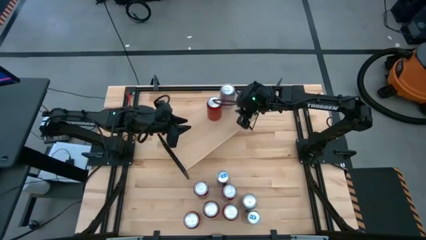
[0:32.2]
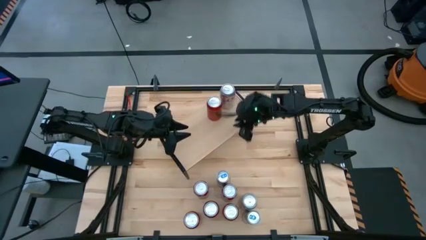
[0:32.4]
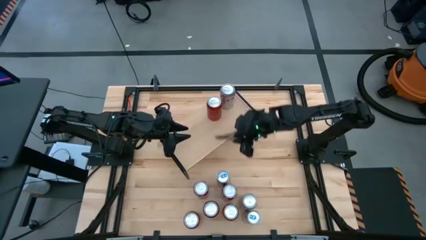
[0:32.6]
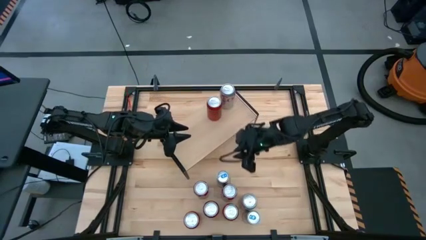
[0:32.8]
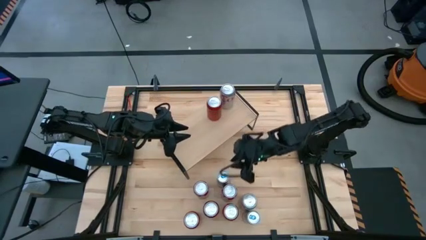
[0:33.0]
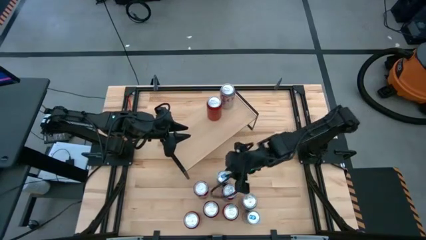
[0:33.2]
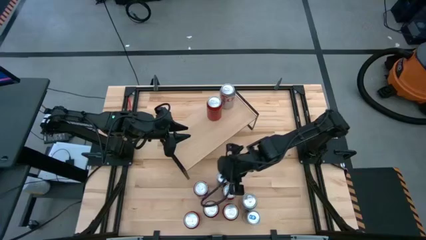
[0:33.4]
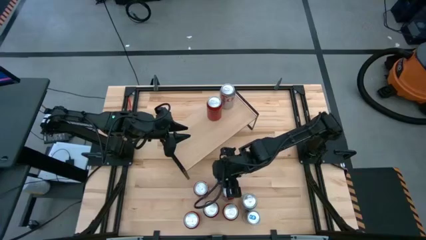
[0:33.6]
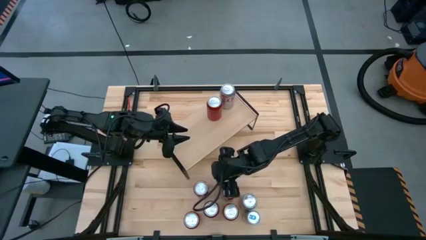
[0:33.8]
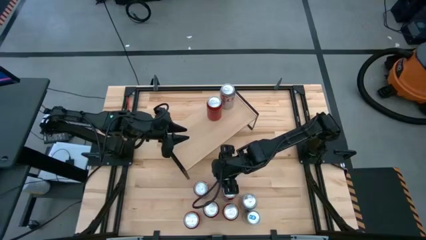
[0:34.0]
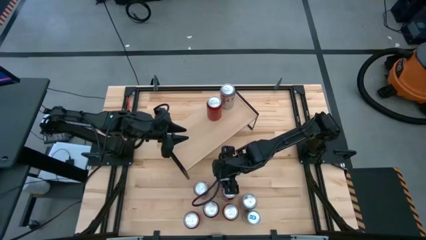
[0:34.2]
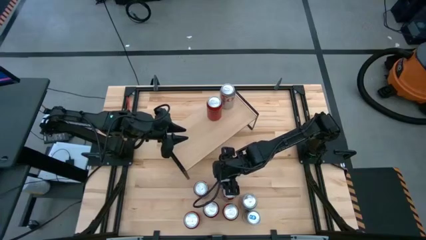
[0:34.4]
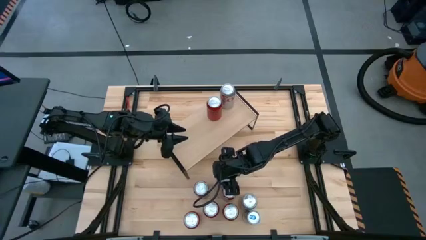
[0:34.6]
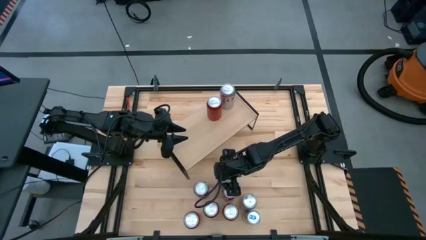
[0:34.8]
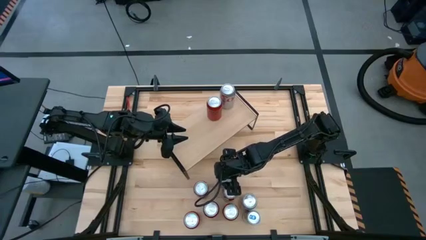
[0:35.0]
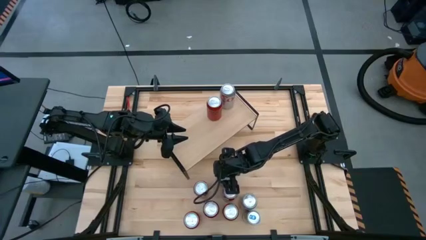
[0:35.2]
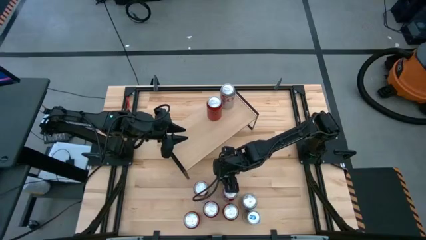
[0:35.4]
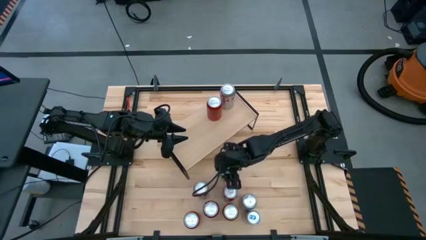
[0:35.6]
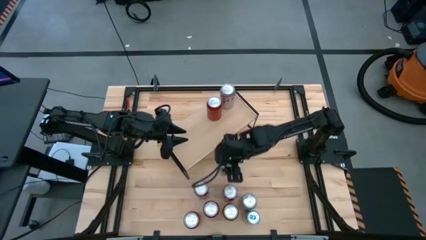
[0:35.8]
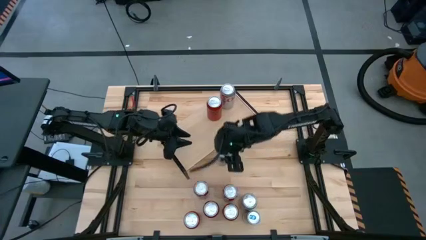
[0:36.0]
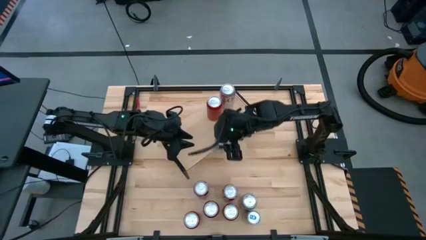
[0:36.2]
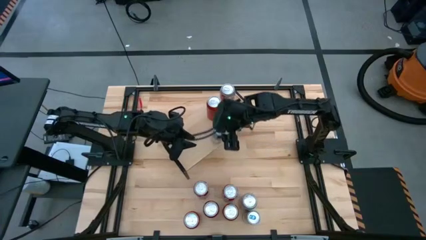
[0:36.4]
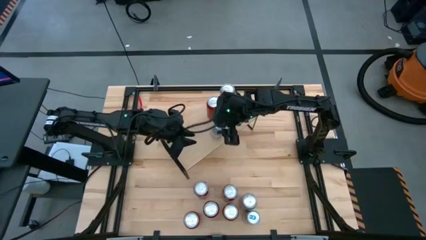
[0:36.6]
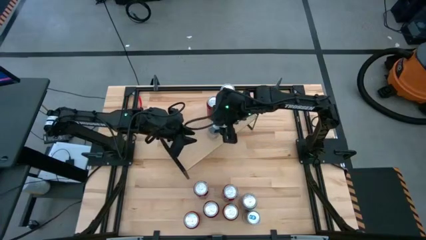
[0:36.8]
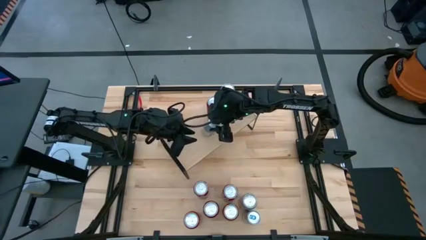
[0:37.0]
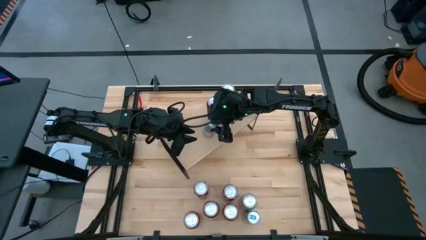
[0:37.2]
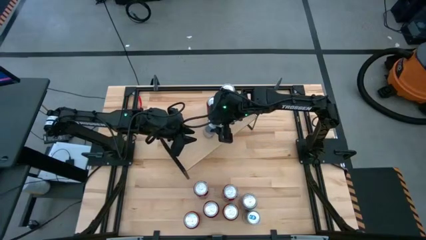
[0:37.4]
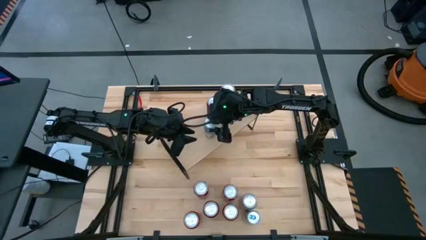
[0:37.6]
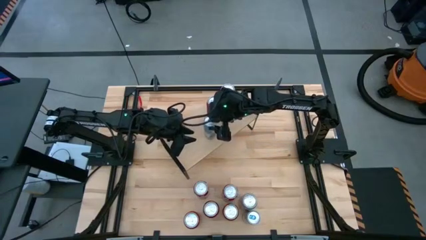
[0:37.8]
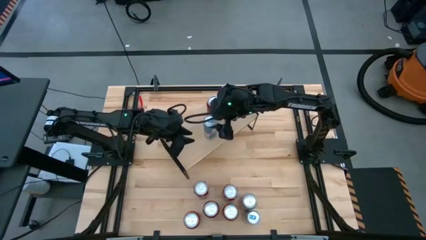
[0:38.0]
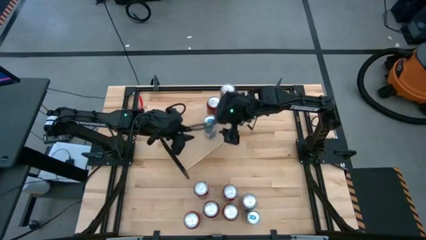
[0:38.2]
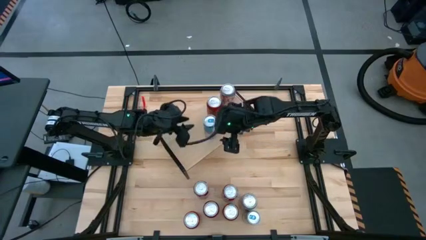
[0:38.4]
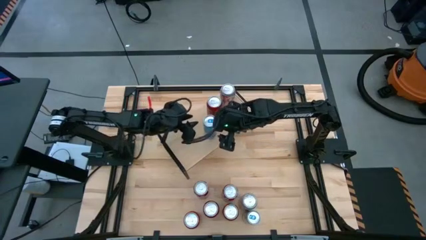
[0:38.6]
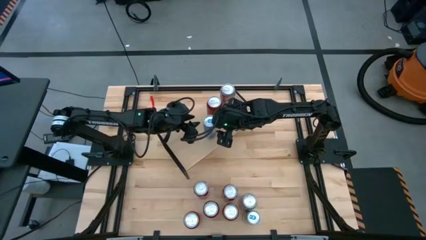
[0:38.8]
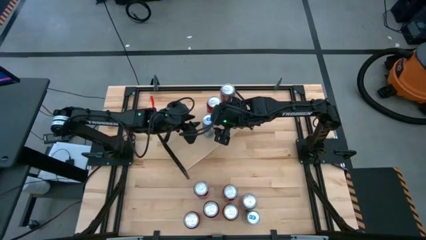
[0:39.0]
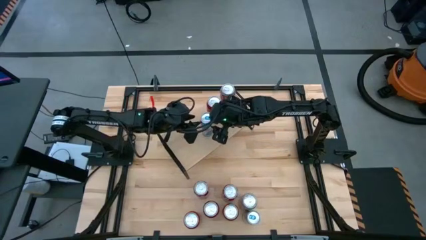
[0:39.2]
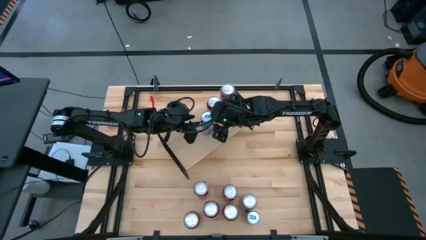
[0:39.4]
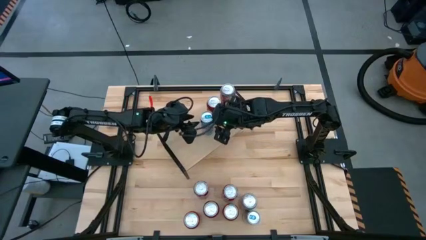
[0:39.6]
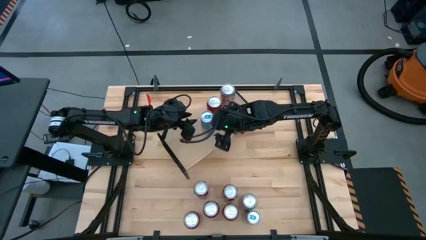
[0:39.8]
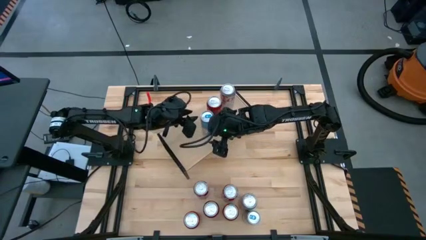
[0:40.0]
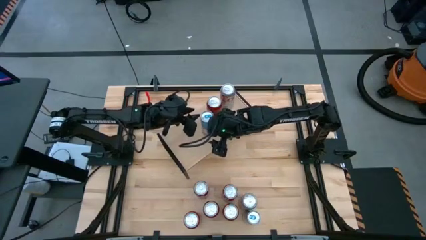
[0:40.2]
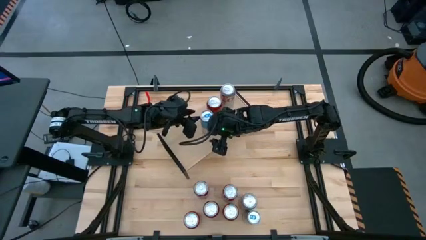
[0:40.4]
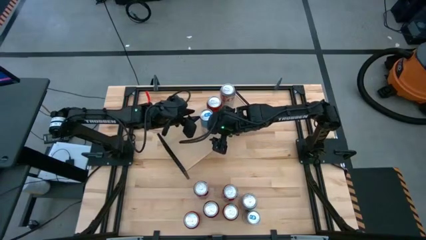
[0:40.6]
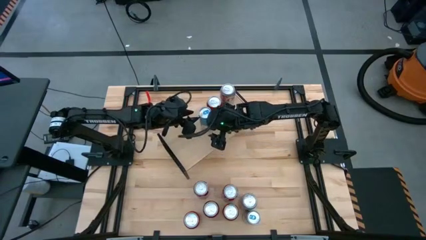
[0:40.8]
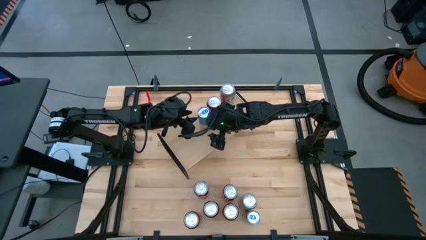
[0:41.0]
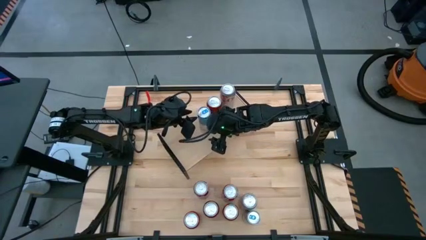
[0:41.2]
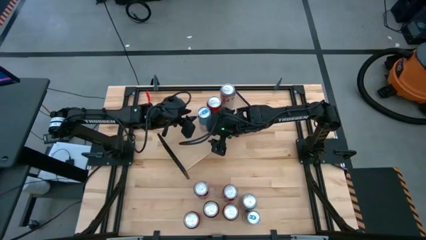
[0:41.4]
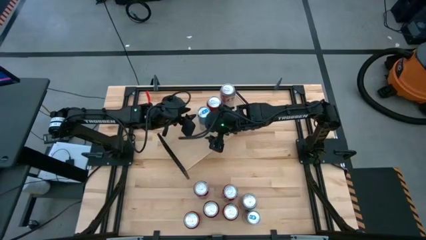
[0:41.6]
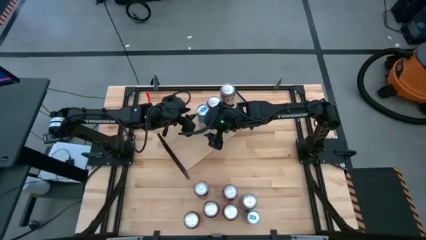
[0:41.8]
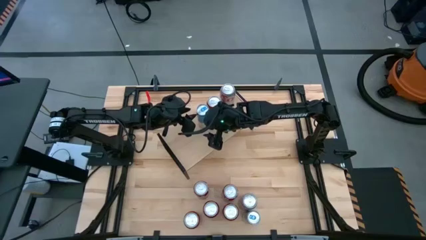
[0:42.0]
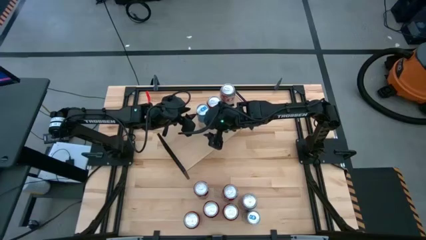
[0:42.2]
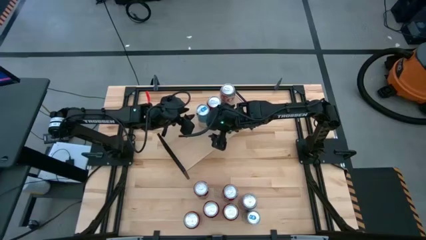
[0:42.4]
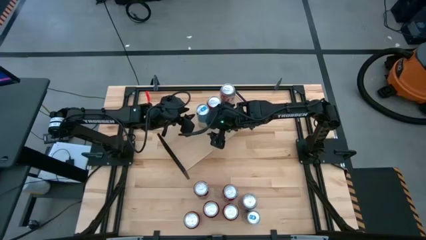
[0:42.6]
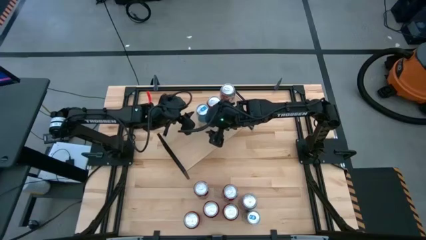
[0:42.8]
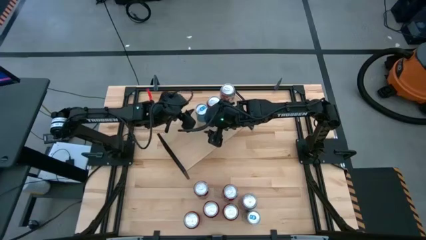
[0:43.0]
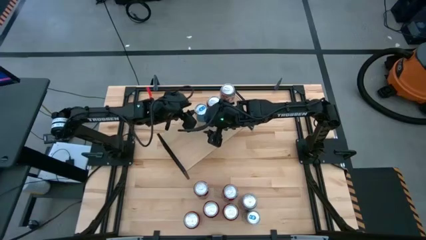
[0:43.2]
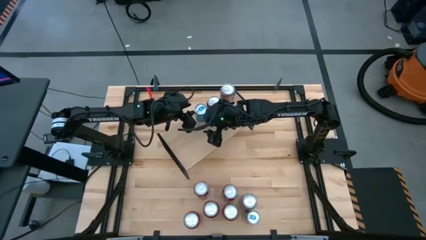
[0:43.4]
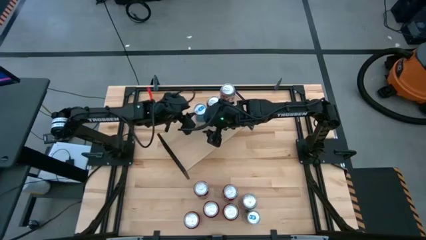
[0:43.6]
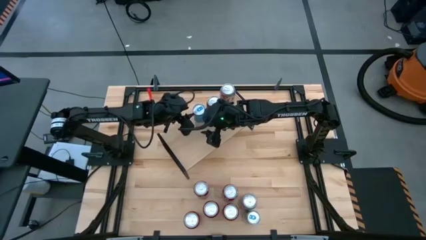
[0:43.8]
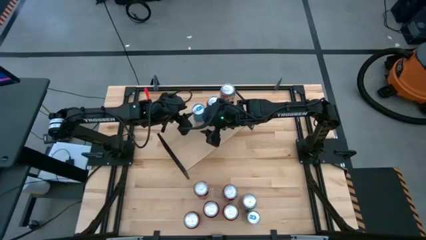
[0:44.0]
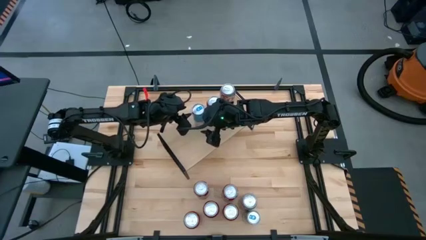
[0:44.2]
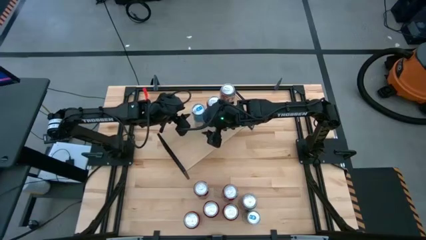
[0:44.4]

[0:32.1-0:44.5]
Task: Place canned beverage on shelf
Put the top blue soda can on the shelf

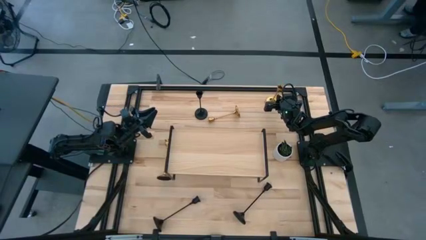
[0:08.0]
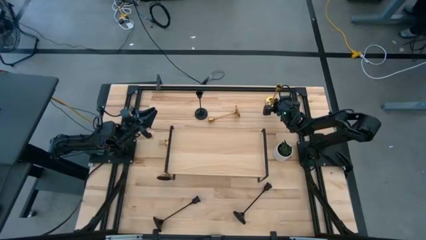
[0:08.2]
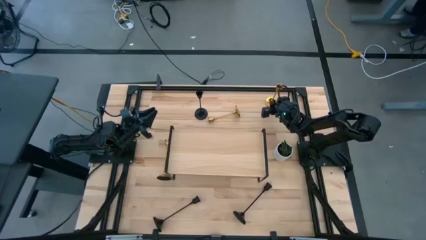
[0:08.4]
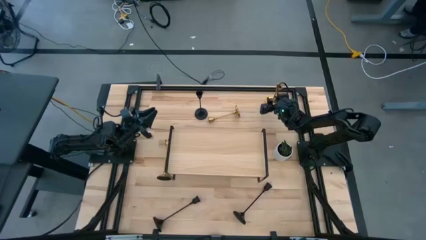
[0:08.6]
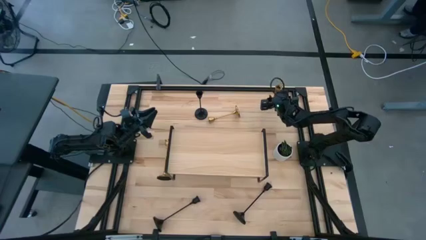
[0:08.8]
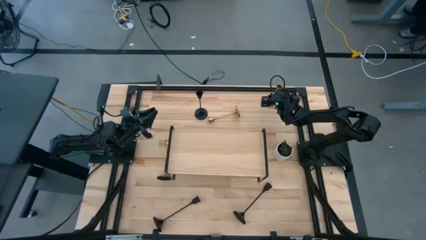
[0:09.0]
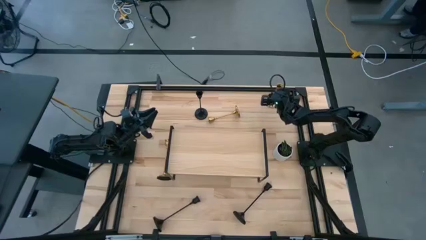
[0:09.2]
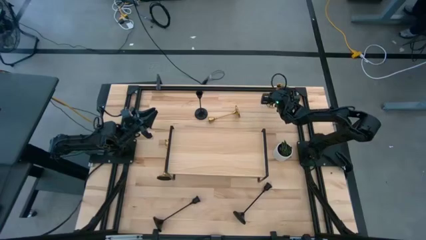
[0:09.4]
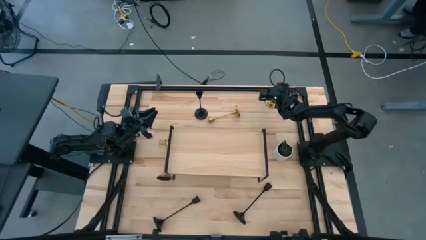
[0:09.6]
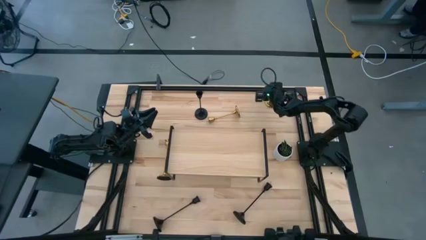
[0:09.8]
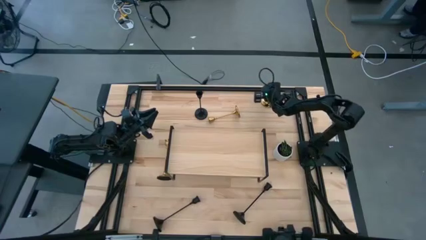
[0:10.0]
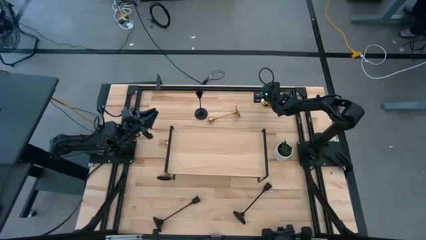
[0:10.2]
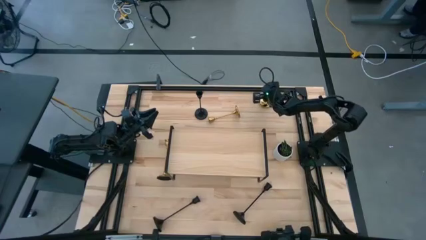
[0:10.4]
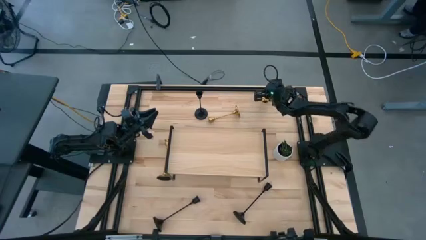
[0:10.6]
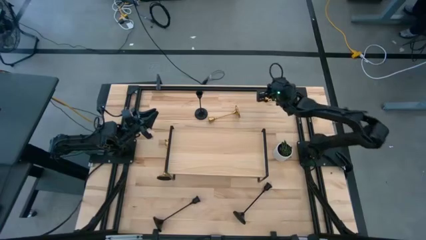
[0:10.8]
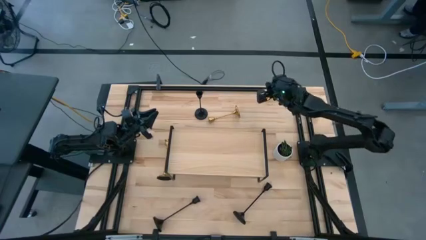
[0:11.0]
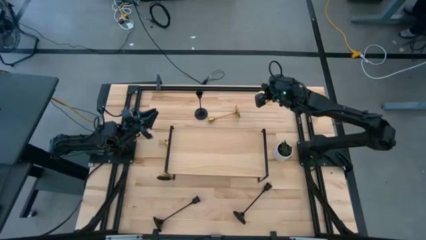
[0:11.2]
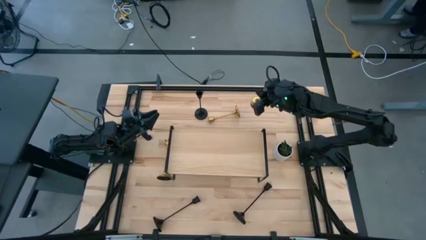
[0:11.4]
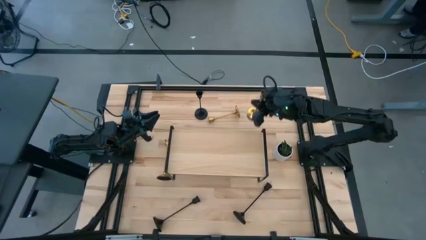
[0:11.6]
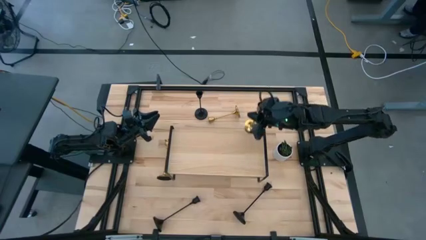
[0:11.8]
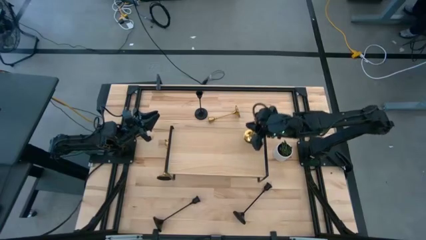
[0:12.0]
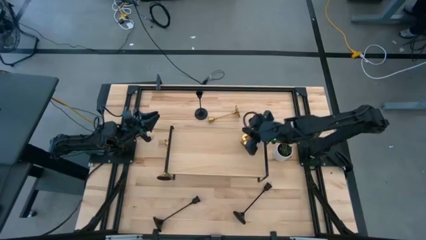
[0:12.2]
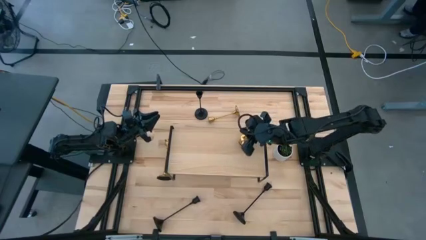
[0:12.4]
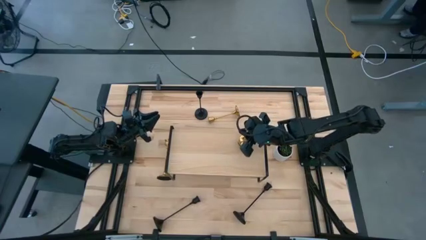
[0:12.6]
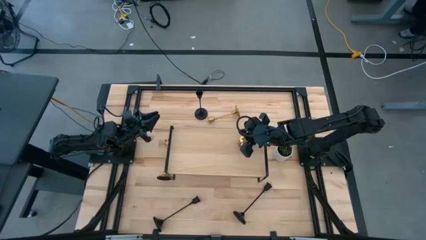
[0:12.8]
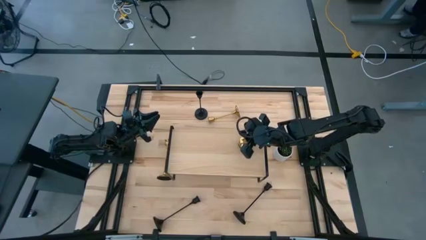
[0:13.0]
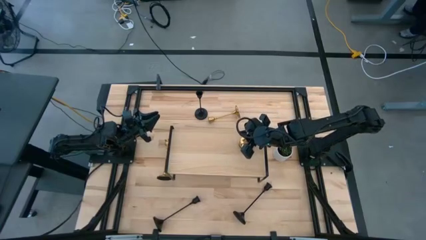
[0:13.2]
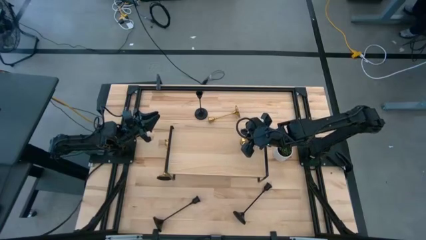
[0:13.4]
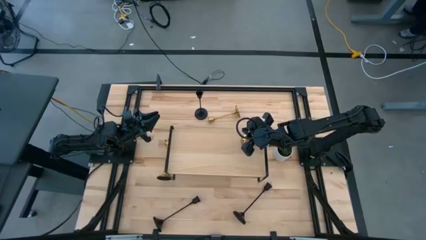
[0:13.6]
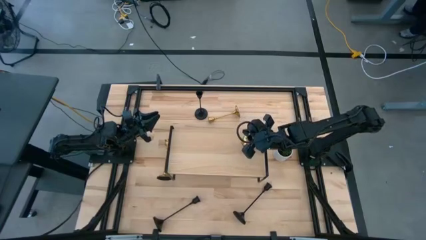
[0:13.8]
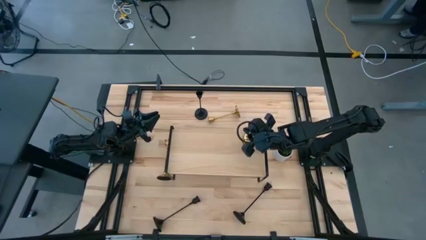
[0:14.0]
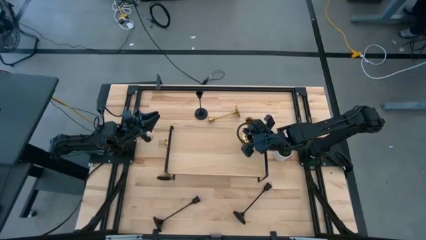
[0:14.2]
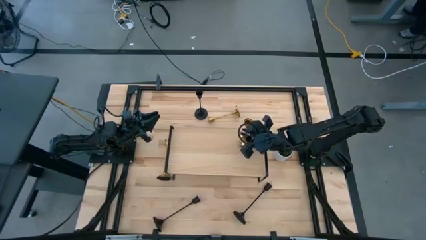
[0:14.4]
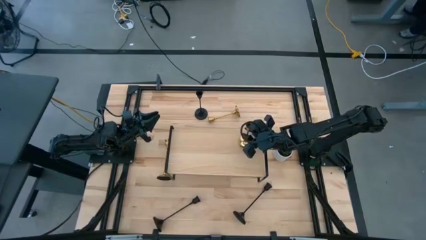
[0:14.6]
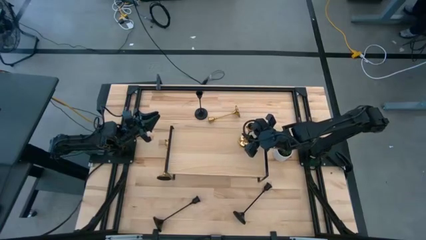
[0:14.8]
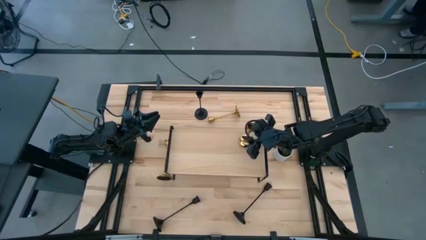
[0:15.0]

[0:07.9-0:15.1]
Task: Pick & Place candle stick holders
Put the top right golden candle holder on the shelf
